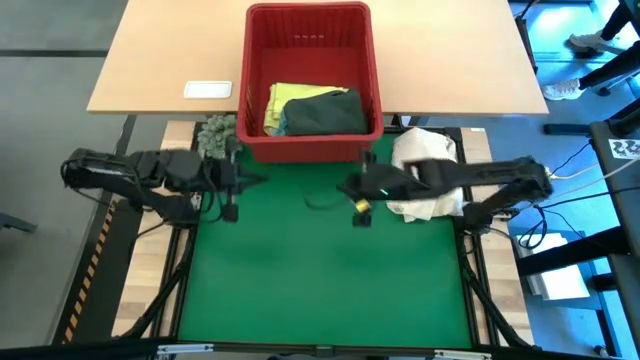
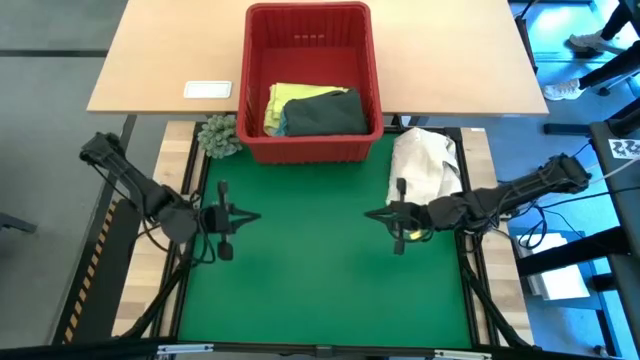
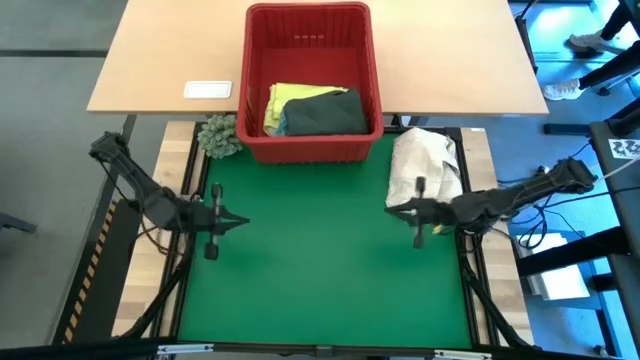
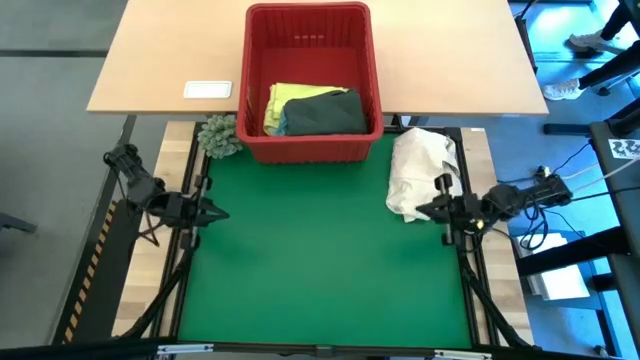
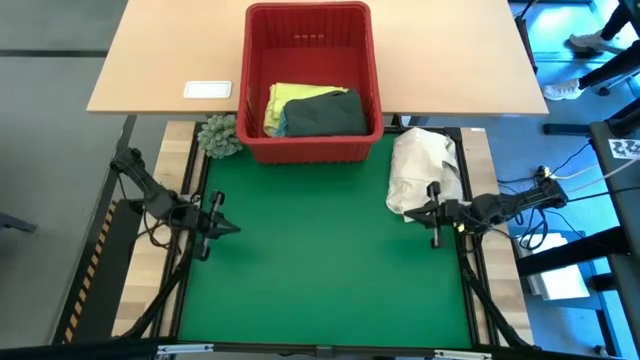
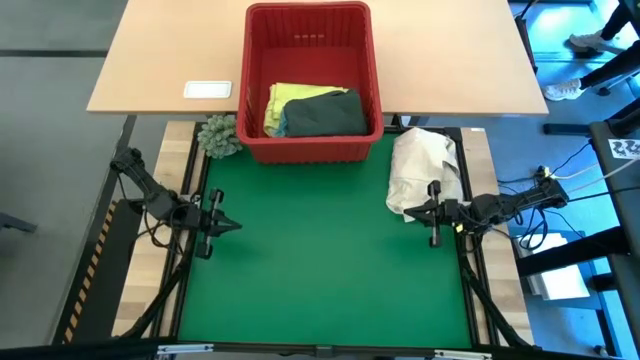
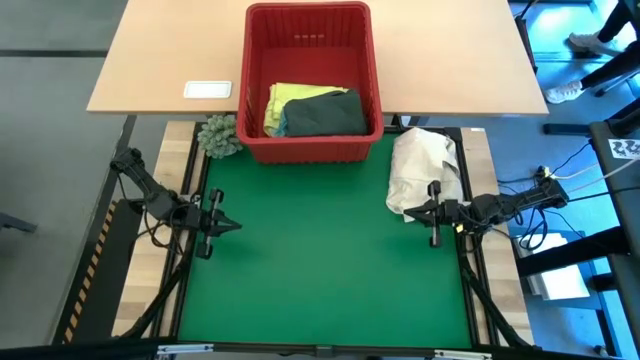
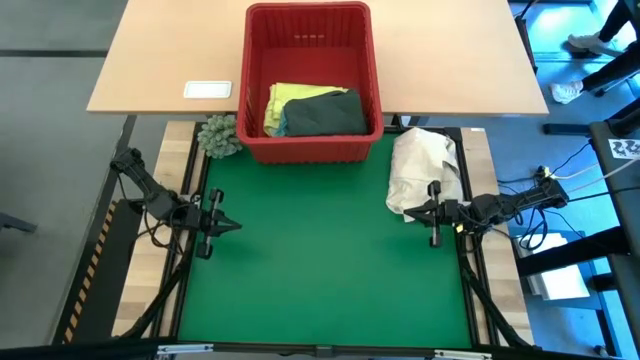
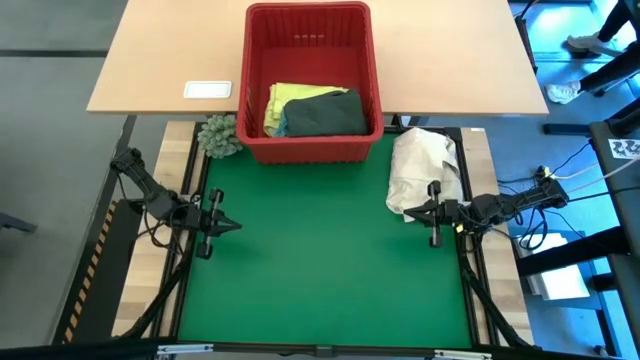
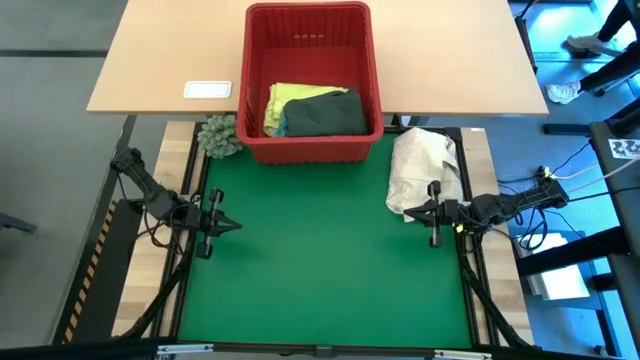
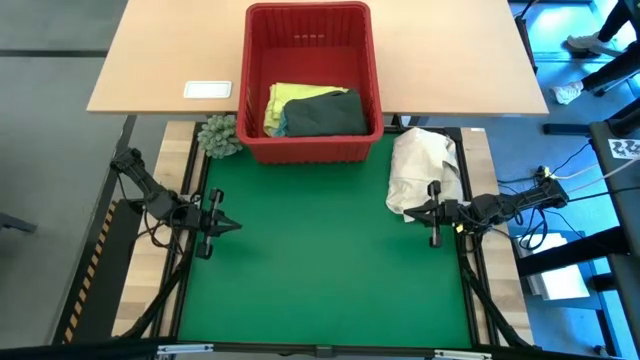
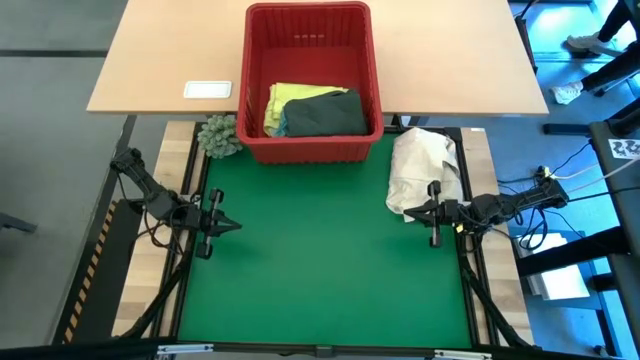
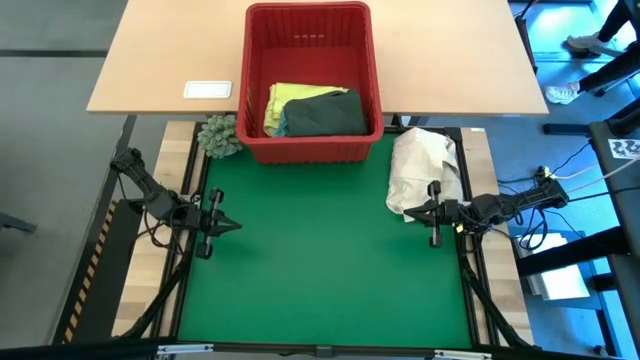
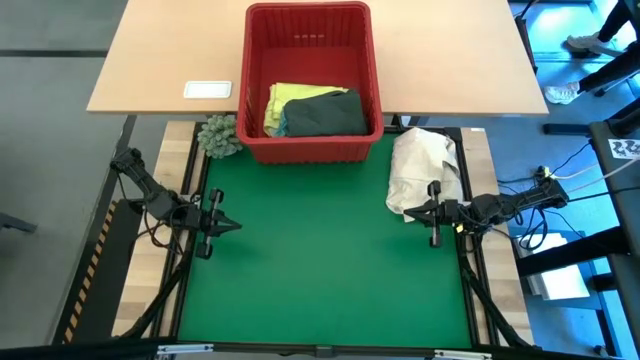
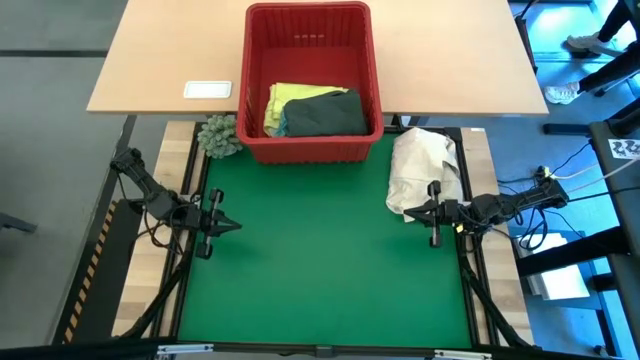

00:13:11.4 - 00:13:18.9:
Task: Fold Laundry from Bin
Return to Home Position

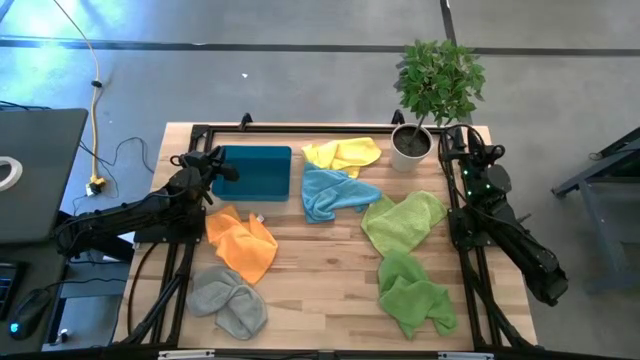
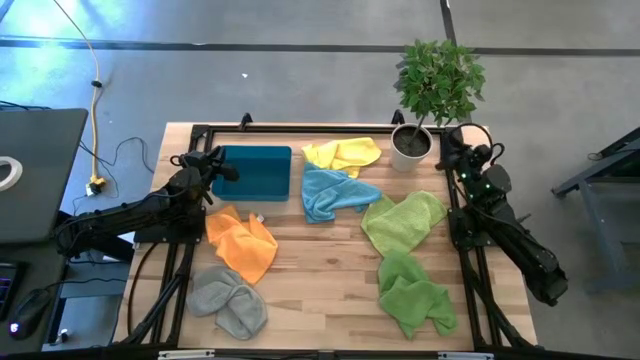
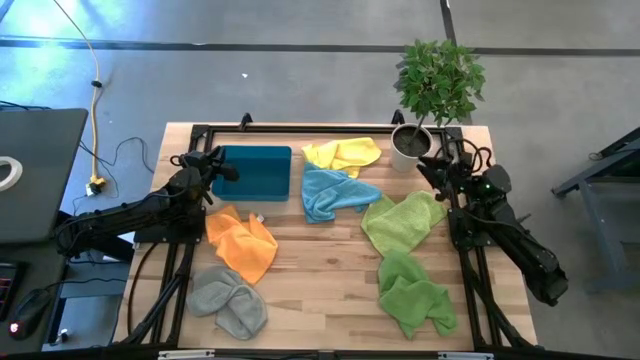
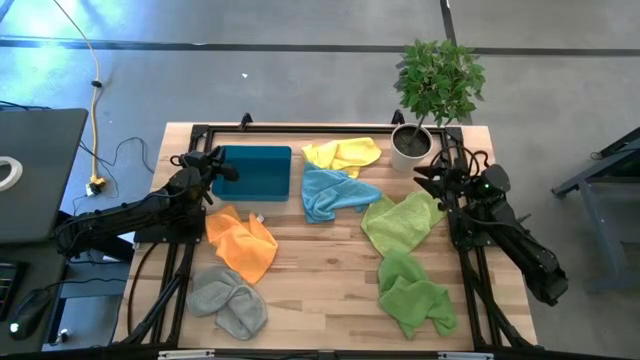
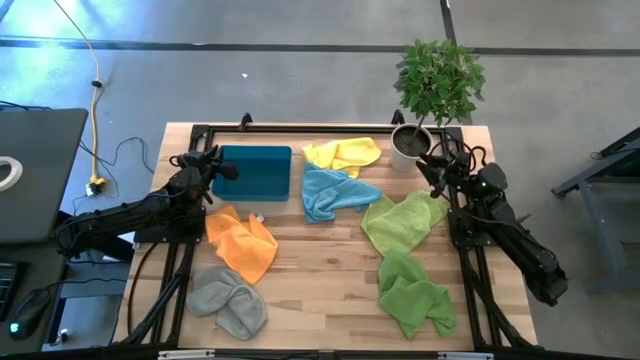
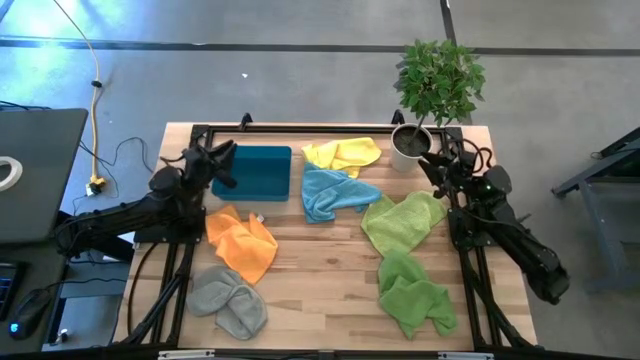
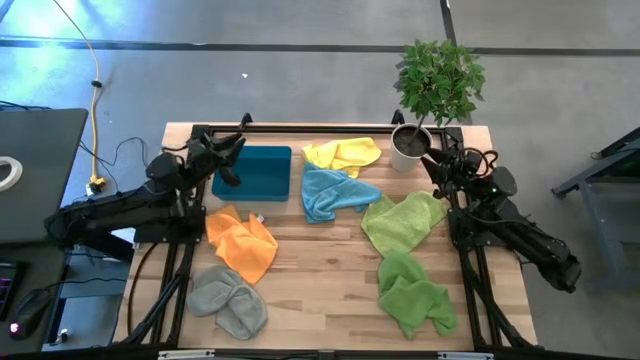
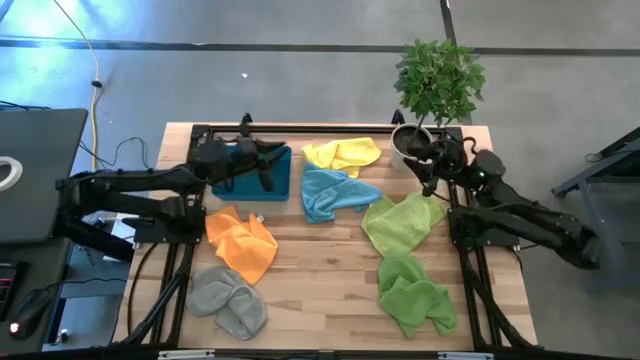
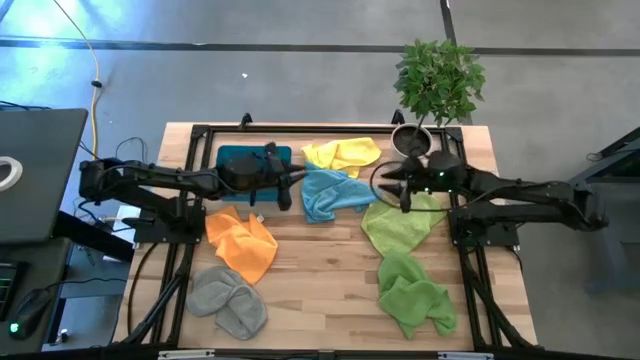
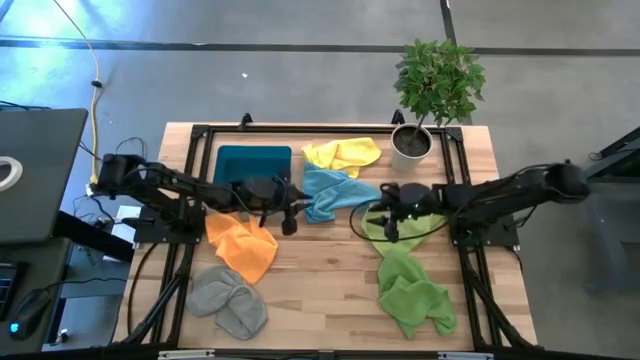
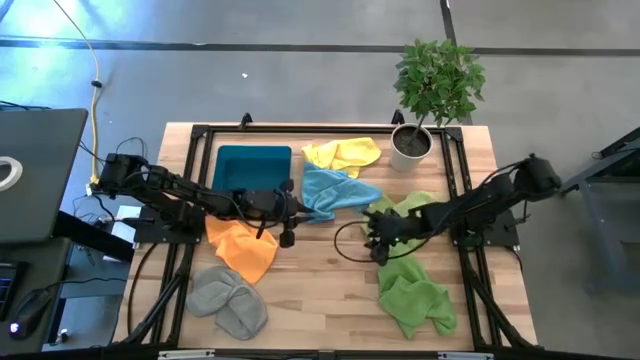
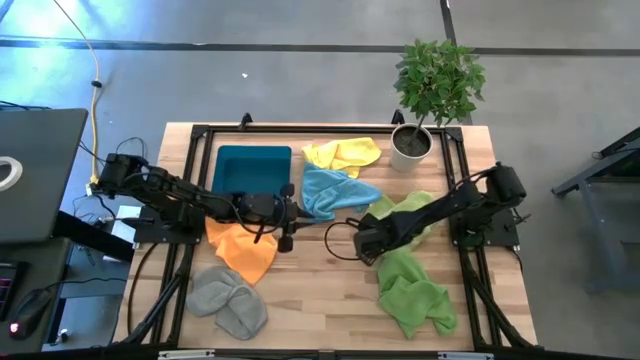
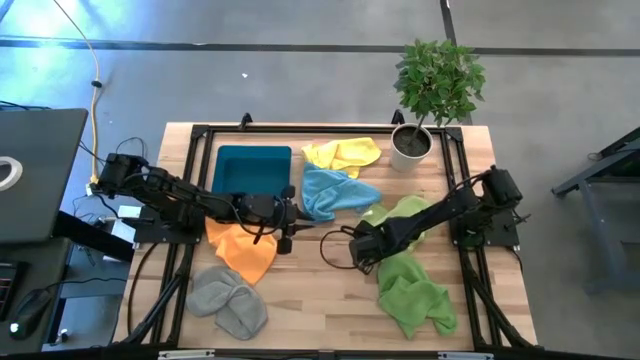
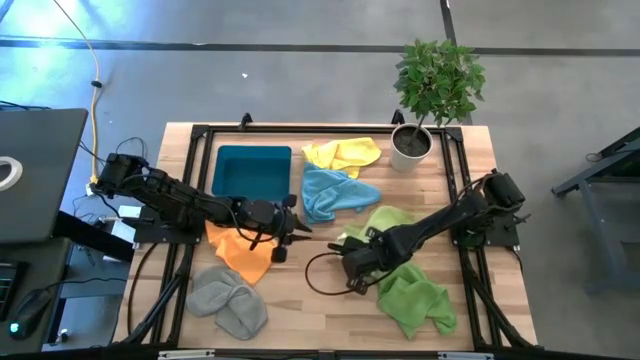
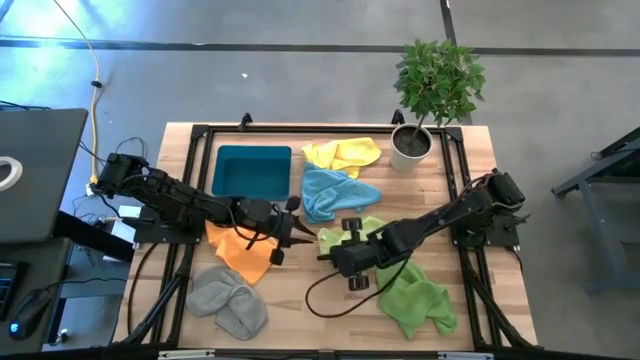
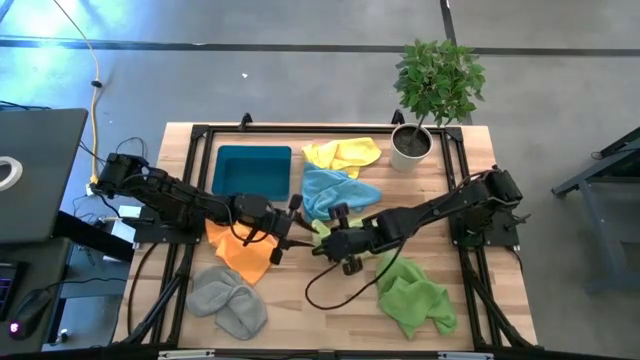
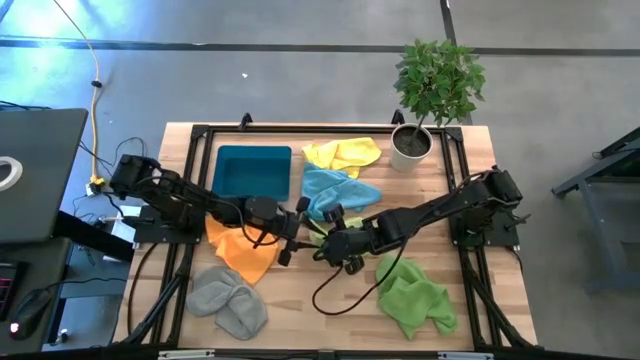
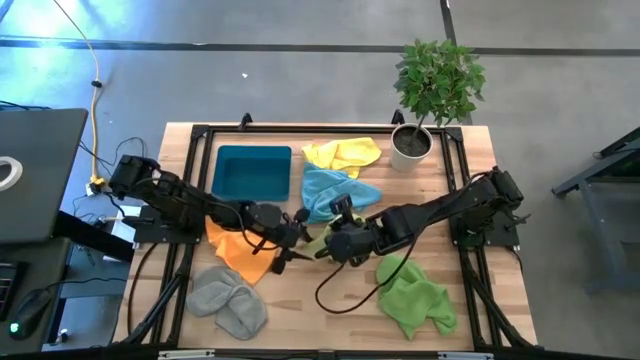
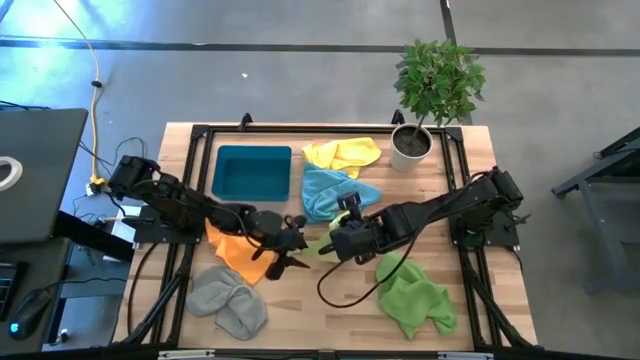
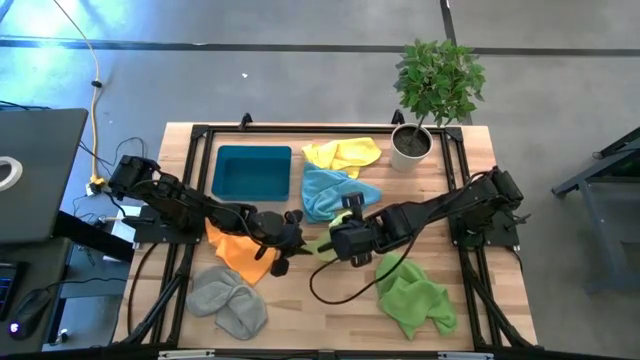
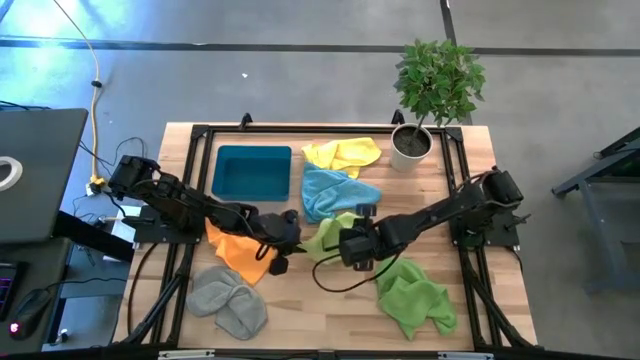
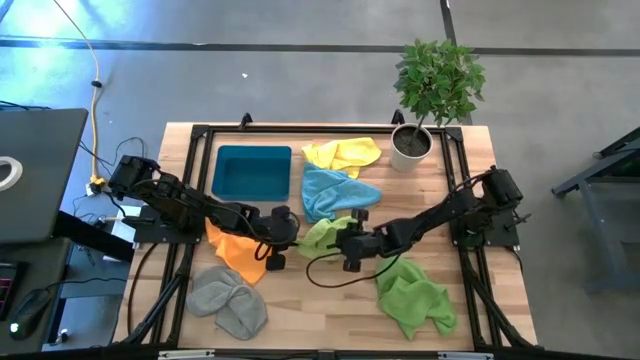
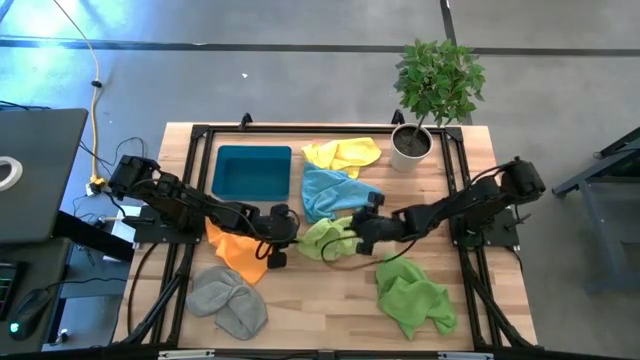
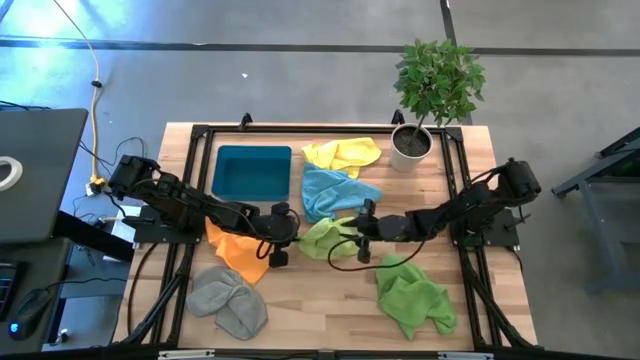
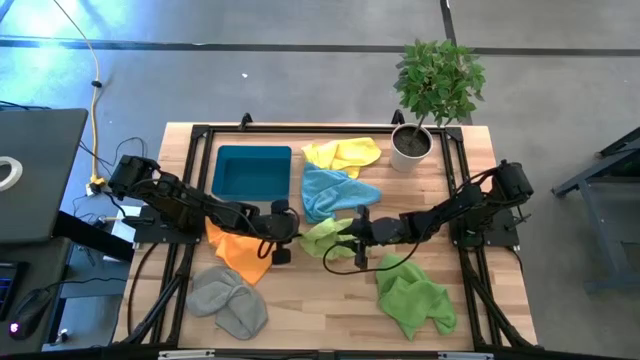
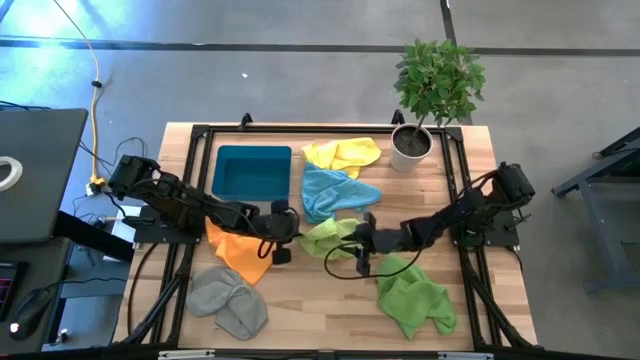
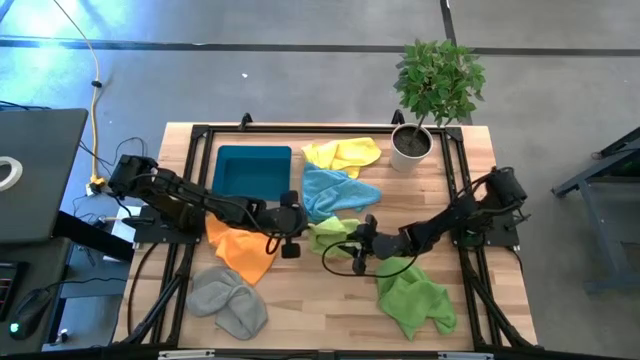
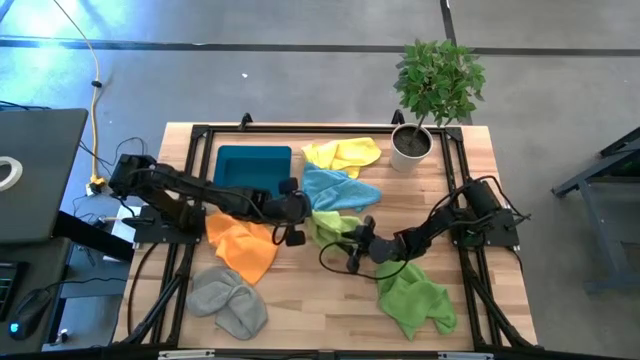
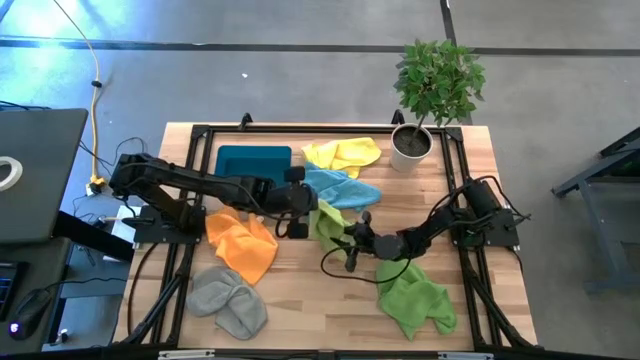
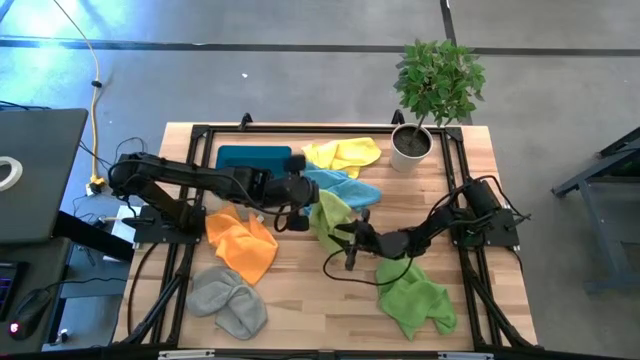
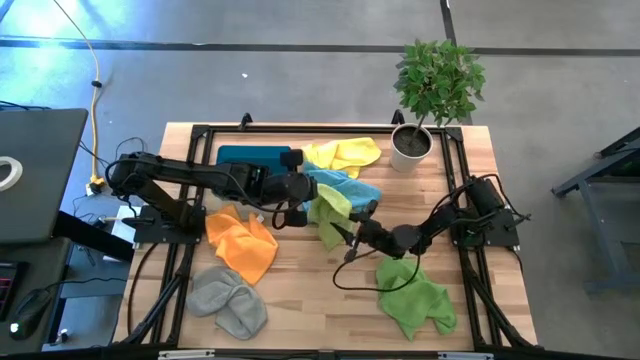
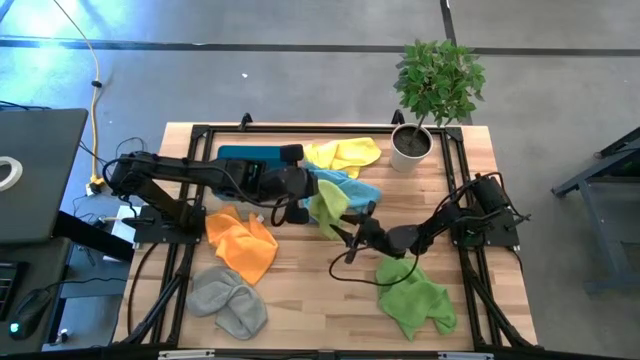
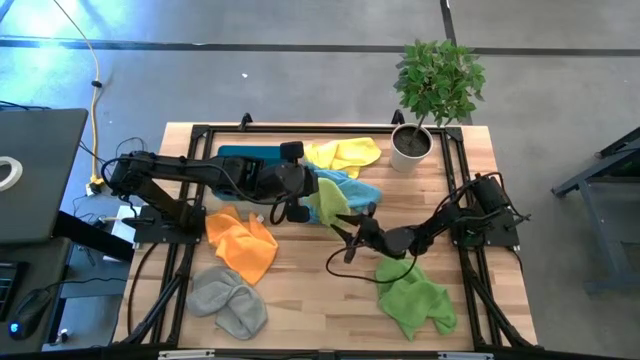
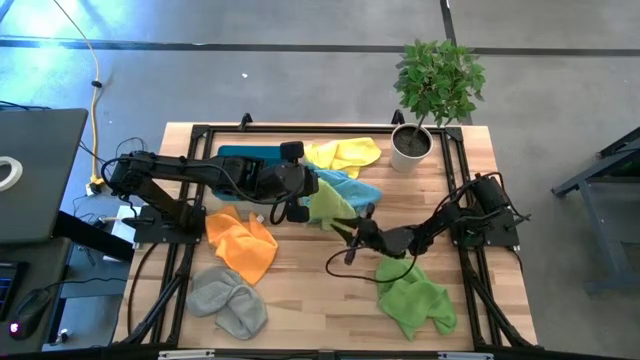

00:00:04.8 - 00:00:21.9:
Task: Fold microfiber towels
Fold the light green microfiber cloth
